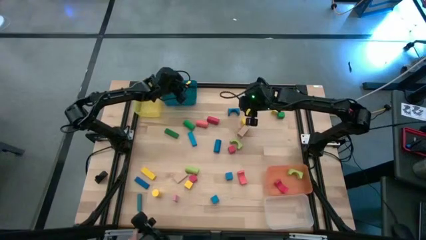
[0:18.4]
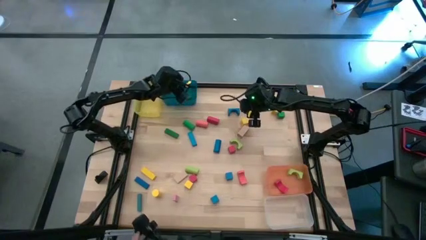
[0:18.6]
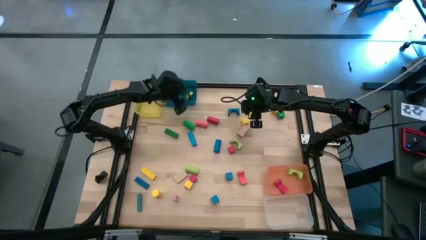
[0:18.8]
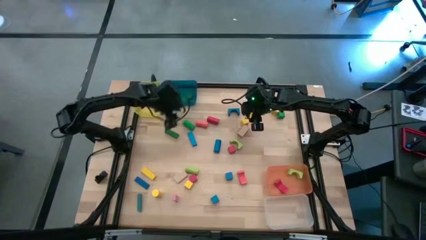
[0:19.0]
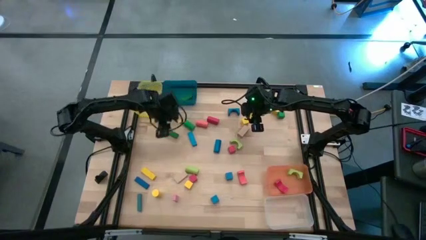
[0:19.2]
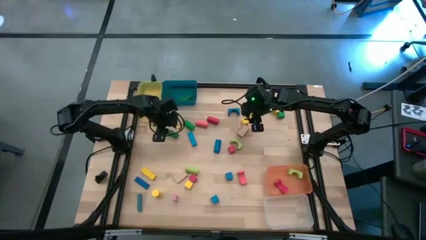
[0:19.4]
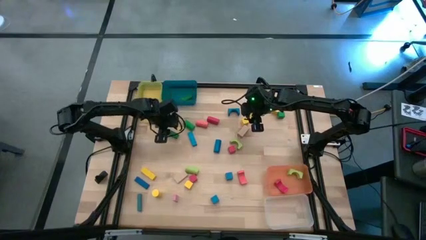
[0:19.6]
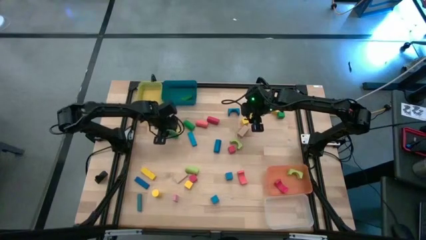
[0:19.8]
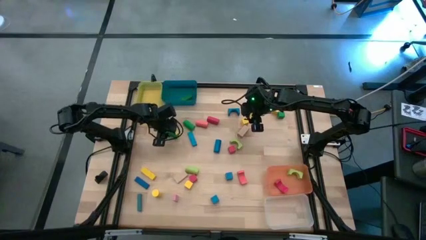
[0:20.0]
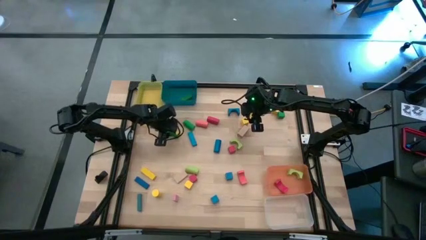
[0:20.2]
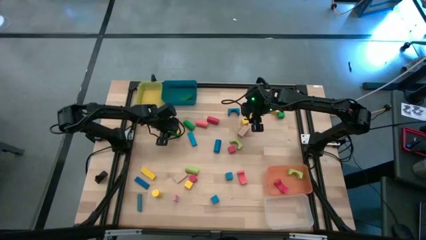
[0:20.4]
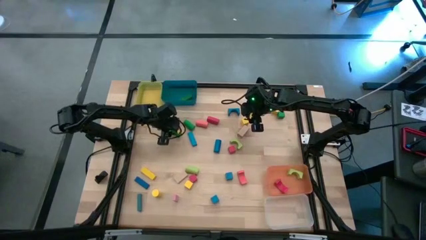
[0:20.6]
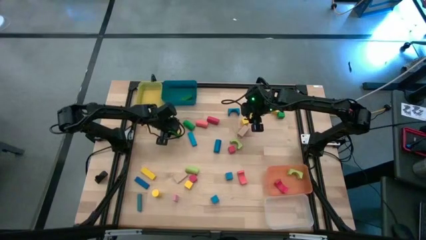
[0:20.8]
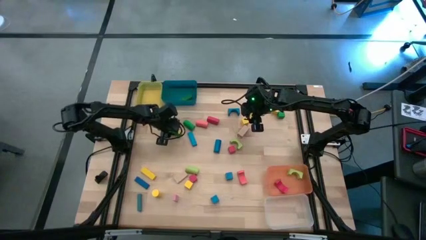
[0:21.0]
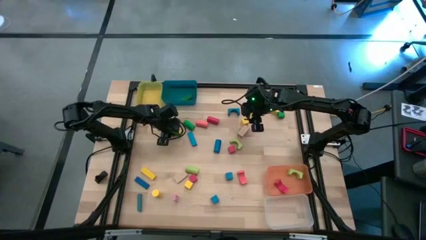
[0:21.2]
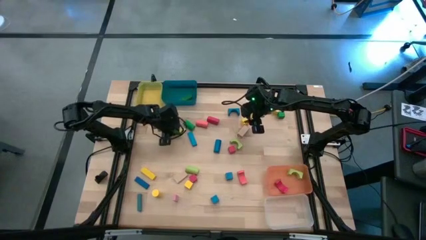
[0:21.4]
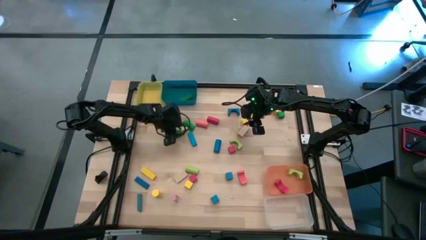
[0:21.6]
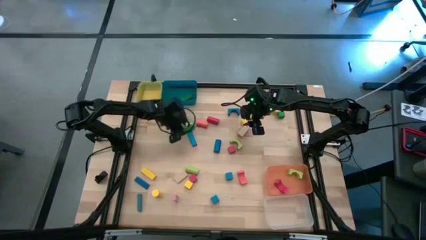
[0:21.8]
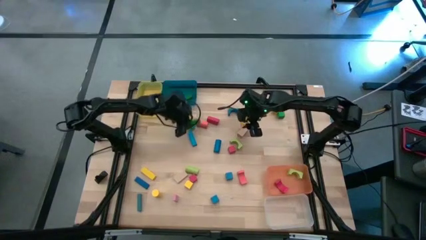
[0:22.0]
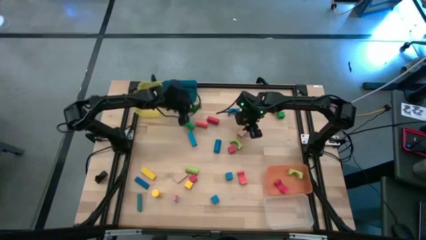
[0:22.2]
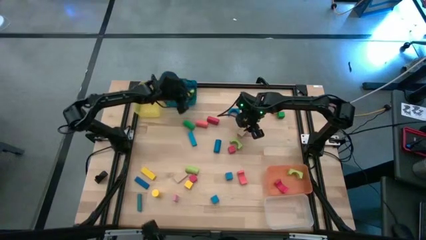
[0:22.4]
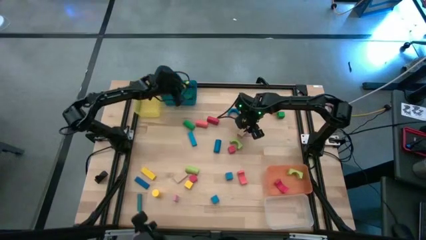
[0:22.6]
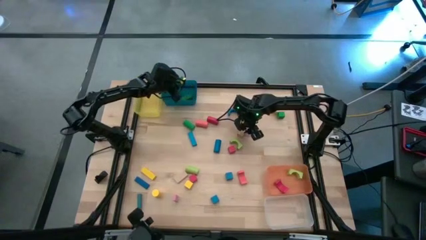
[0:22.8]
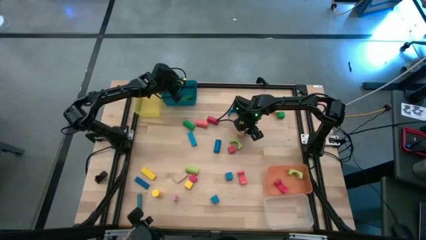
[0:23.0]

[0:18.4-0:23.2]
Task: Sort blocks by size
Put the green rectangular block into the blue bin

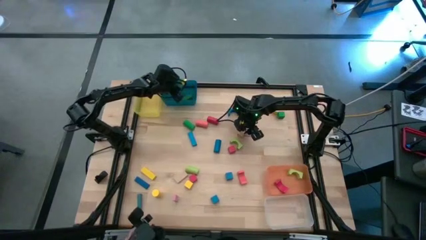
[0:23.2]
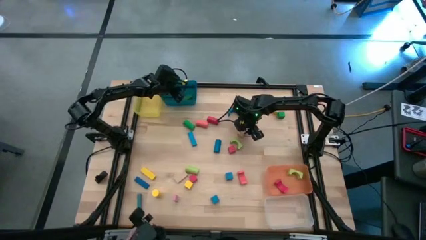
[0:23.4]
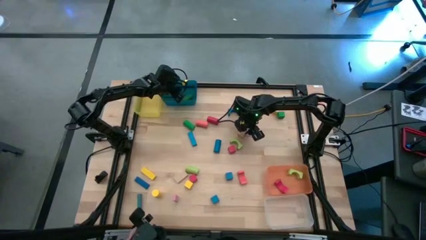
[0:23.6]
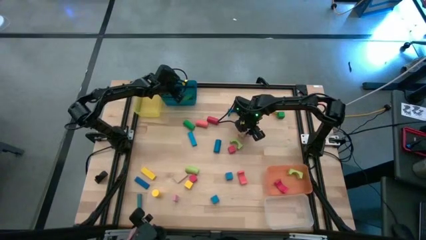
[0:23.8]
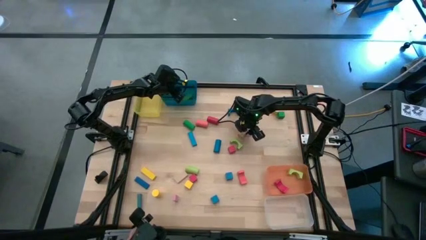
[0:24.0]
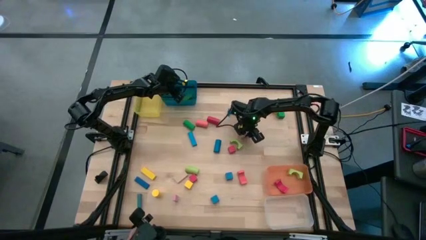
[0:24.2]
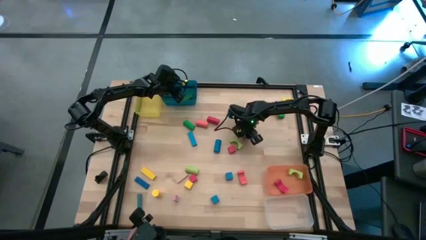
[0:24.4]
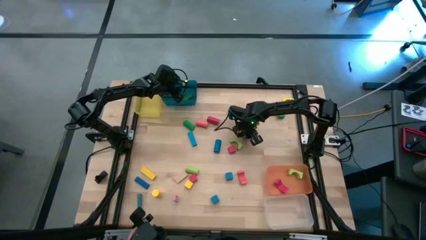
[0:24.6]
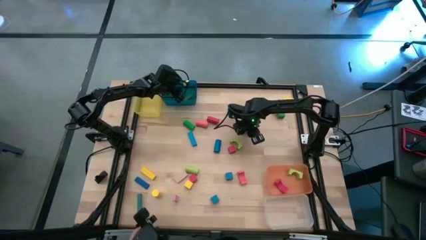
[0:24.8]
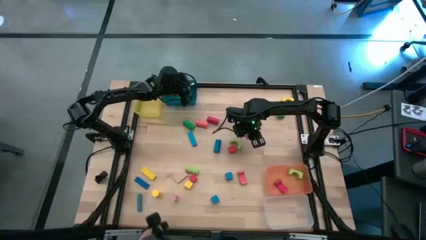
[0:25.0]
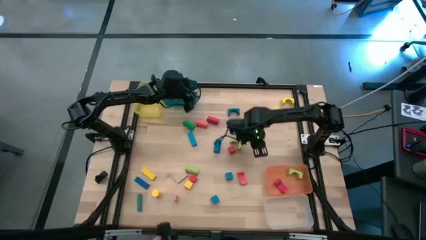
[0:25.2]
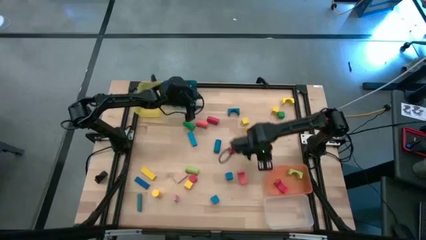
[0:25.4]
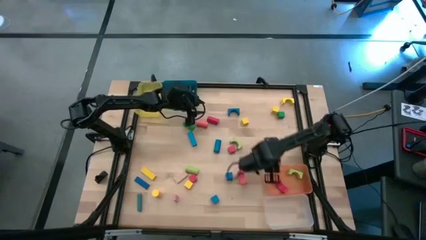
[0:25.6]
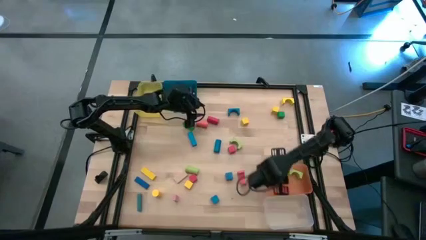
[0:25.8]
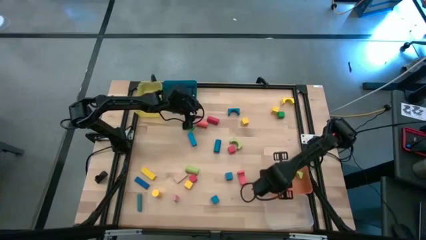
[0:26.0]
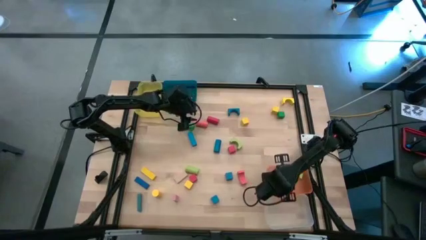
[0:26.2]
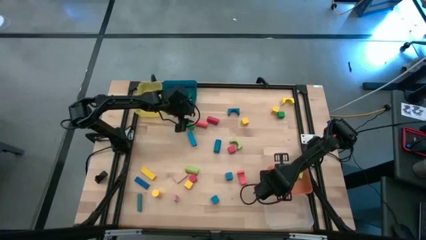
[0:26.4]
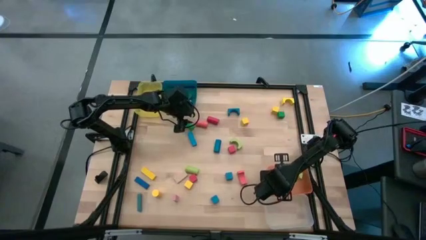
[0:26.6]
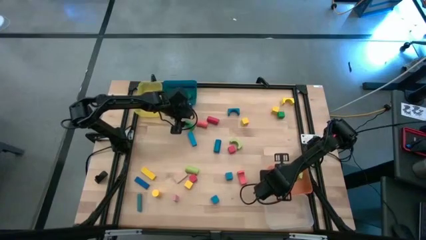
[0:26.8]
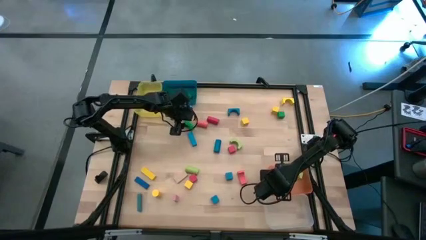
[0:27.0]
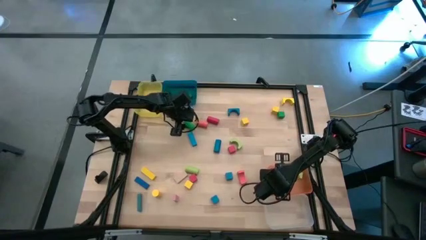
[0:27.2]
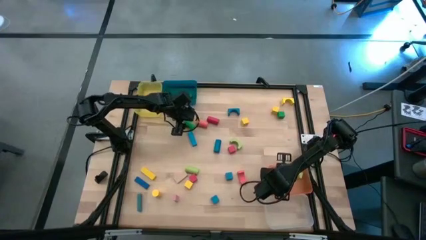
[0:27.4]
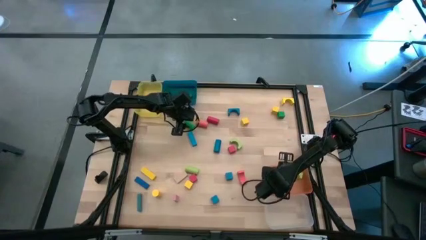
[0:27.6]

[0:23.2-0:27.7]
Put the light brown arch block into the orange bin

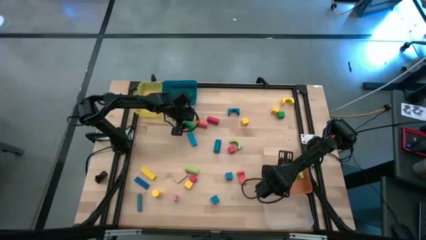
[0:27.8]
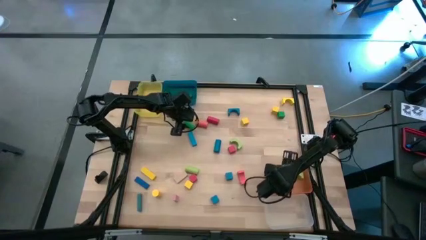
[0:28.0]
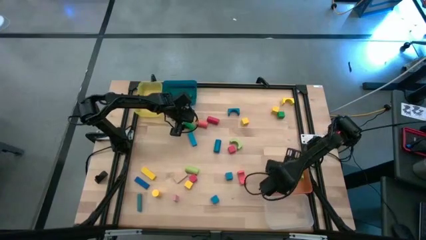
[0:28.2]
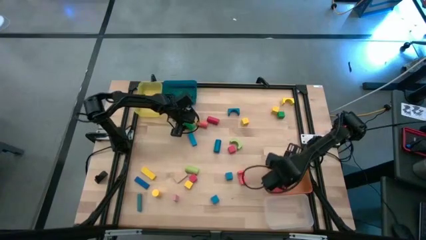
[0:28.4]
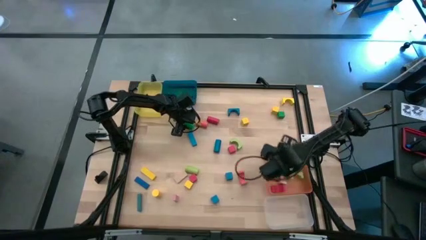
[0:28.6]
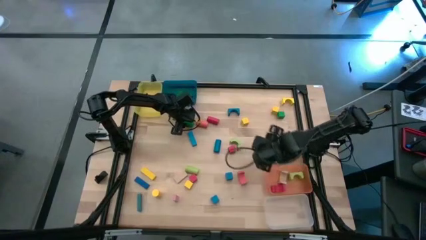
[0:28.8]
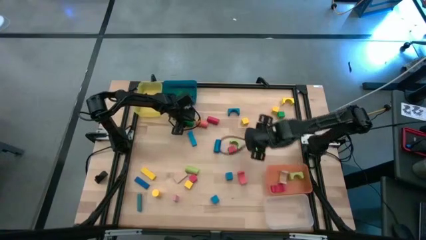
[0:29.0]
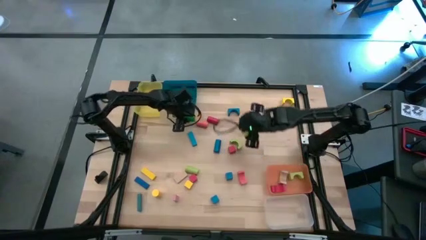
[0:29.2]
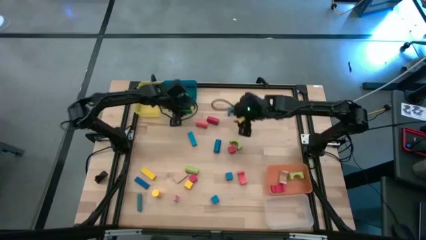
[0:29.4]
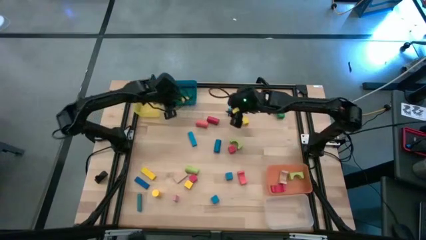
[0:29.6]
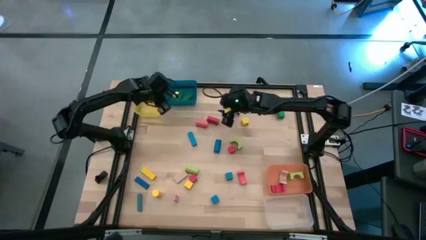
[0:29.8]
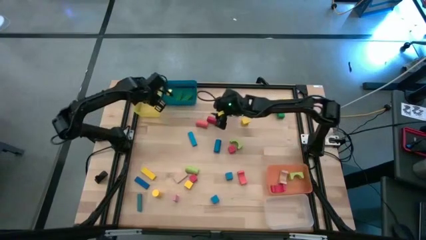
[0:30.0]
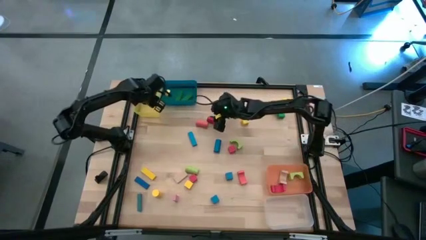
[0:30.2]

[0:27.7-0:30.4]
Put the green cylindrical block into the yellow bin

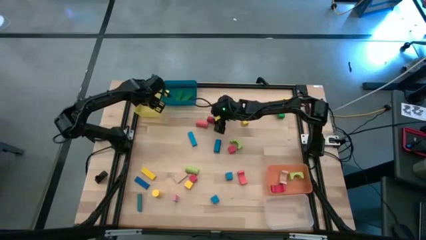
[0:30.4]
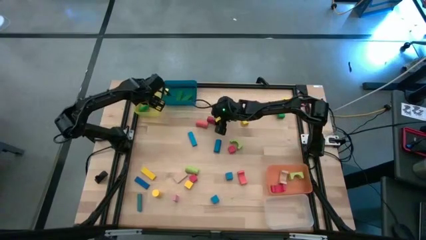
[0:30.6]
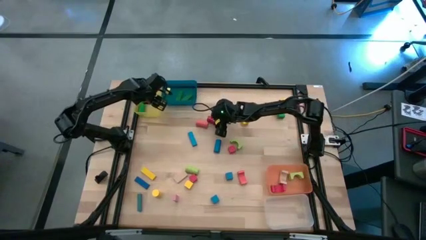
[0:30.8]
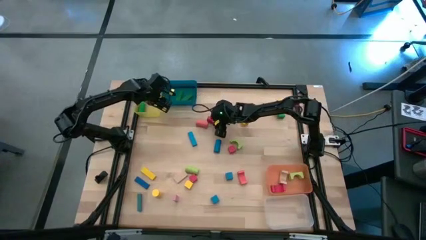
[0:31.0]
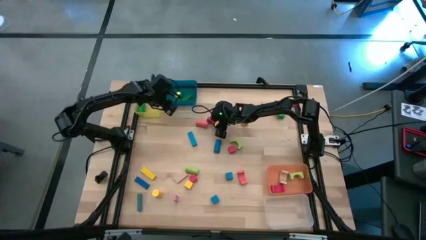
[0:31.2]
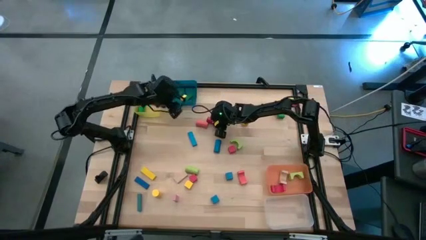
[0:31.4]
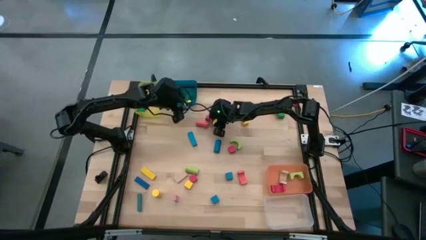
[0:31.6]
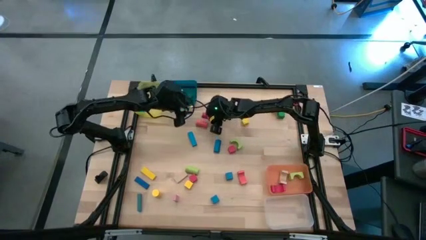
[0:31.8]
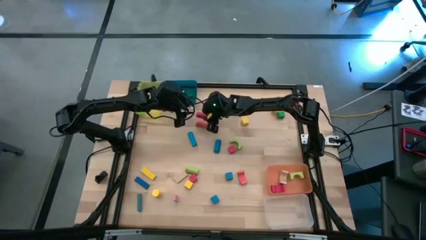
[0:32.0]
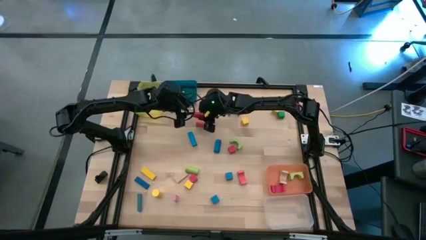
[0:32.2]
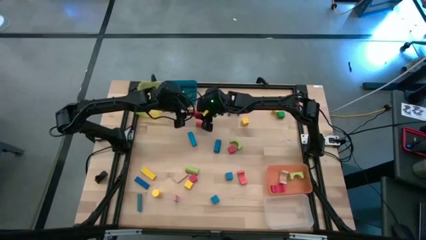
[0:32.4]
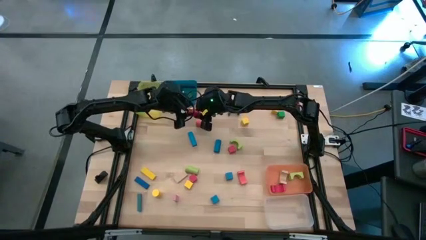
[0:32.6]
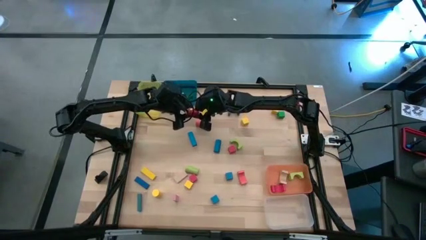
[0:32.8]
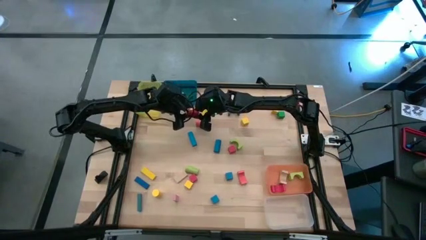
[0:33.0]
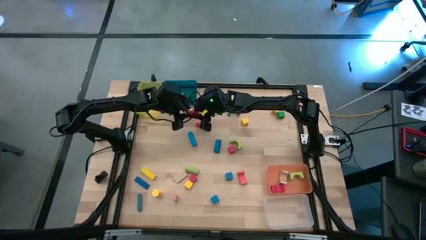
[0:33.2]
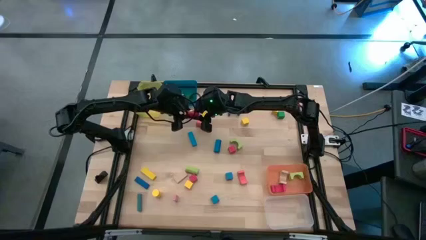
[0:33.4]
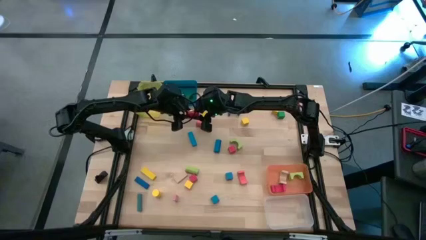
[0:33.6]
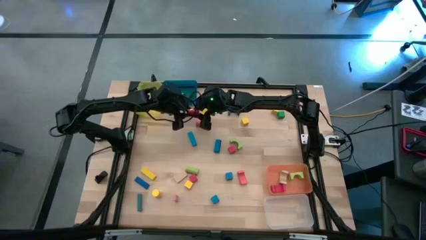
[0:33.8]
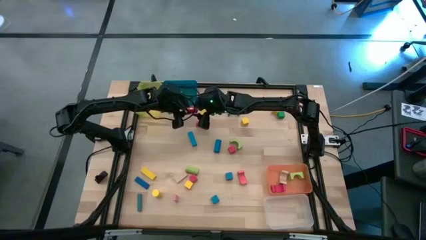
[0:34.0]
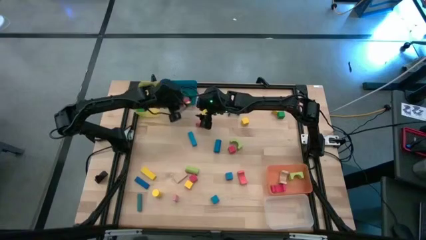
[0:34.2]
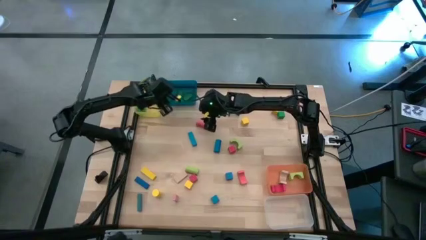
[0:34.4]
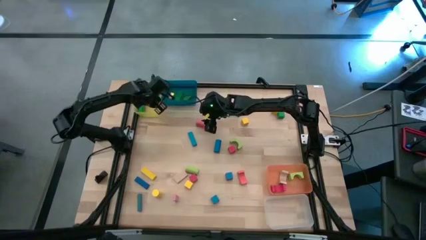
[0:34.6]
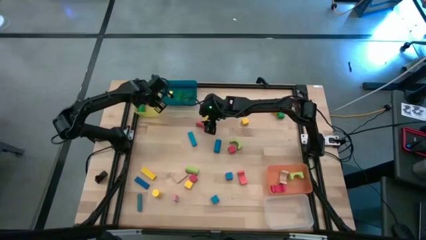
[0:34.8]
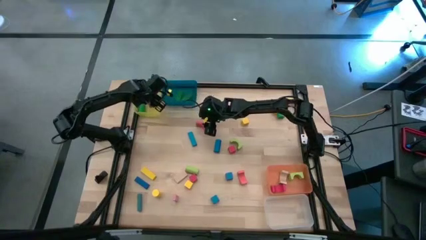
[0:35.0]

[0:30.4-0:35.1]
Put the red cylindrical block into the yellow bin
